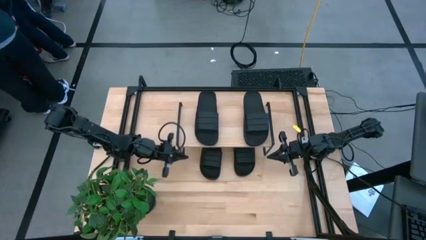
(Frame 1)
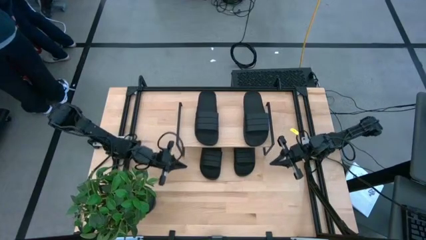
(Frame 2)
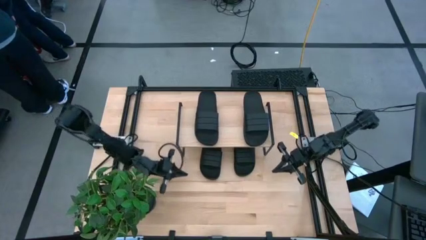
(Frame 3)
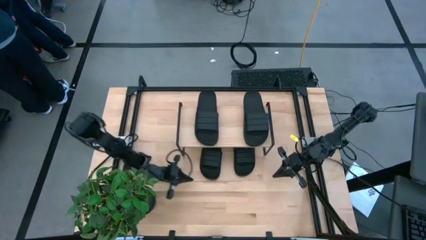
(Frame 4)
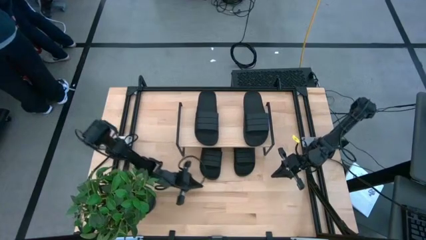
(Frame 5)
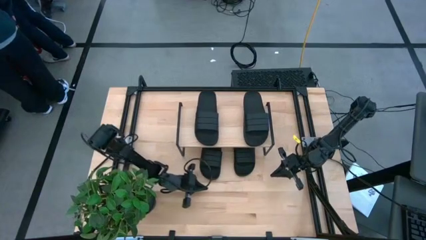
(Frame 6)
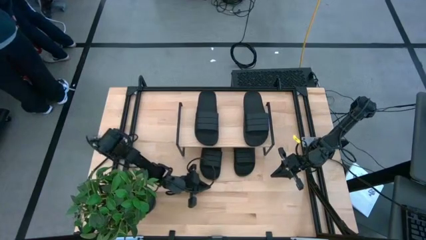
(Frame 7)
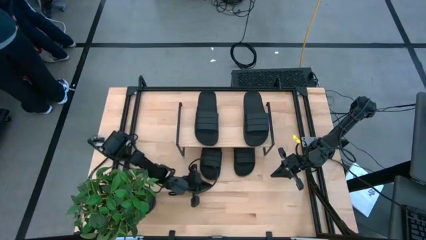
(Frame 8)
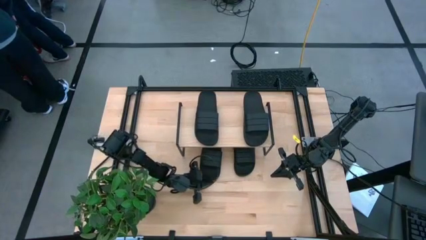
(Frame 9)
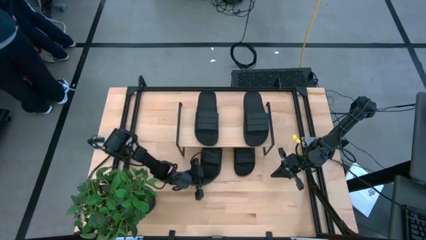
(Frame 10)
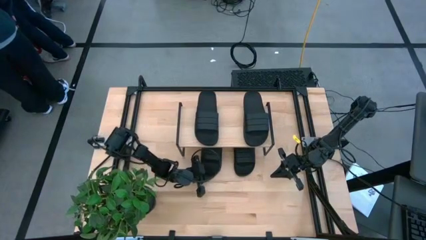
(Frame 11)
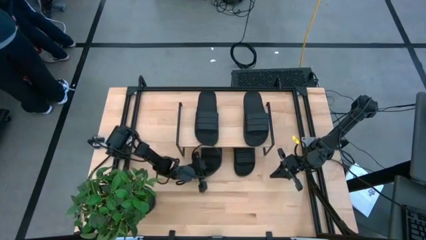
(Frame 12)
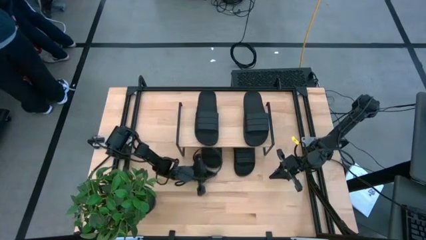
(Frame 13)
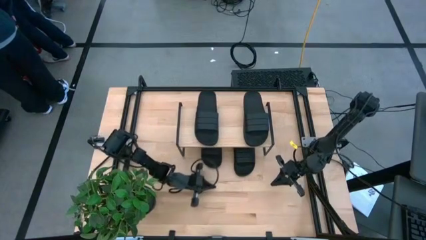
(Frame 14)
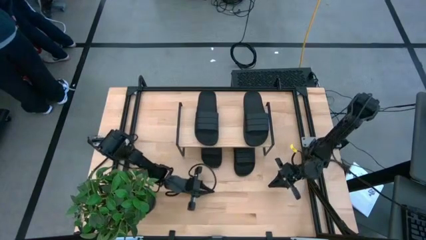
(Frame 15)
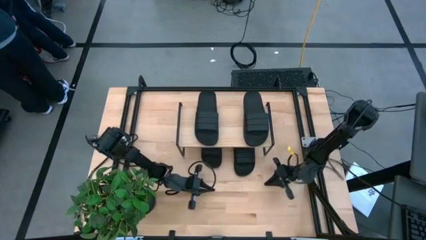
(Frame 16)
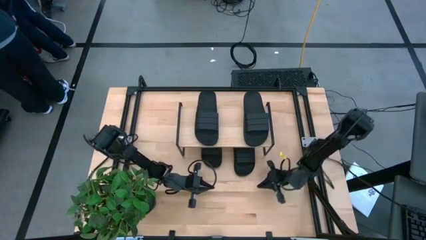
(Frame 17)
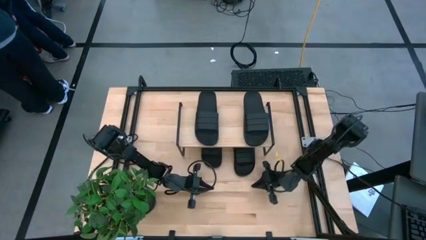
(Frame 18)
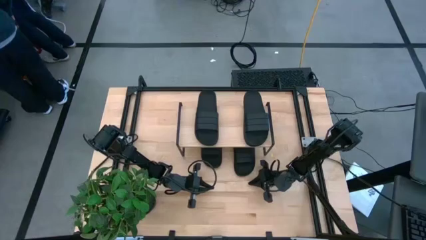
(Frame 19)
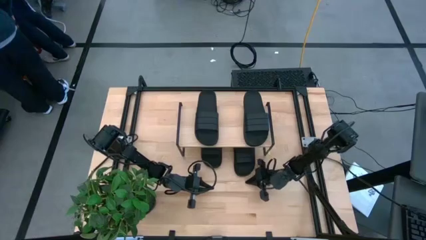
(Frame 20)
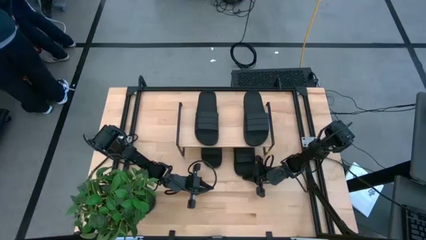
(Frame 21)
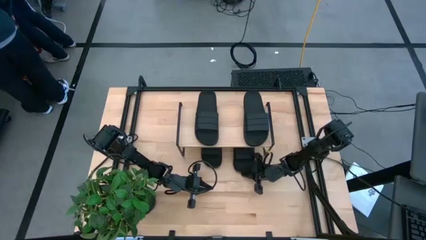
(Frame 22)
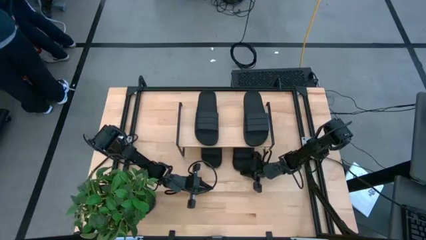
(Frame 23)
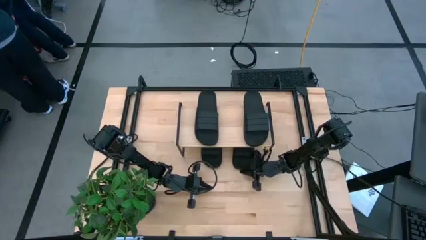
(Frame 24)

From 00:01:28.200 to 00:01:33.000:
Task: Pick and place slides into the shelf
Adjust the slides under the shelf

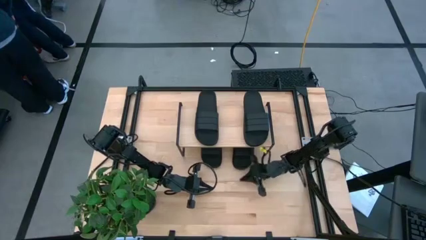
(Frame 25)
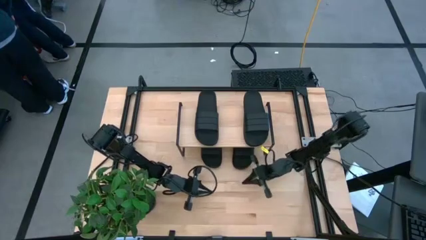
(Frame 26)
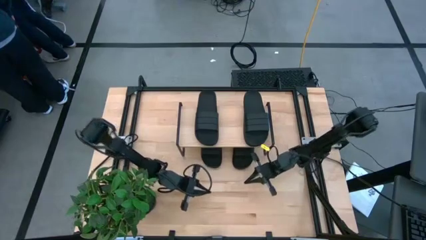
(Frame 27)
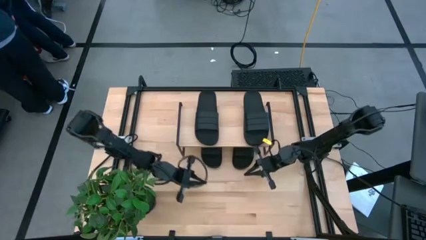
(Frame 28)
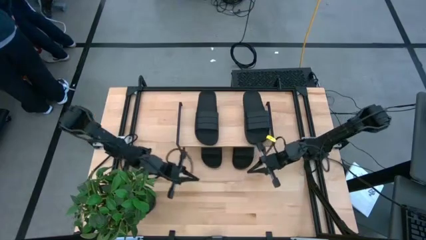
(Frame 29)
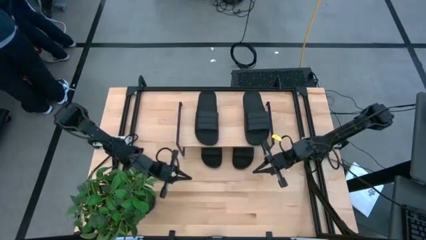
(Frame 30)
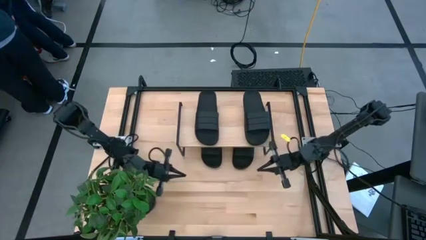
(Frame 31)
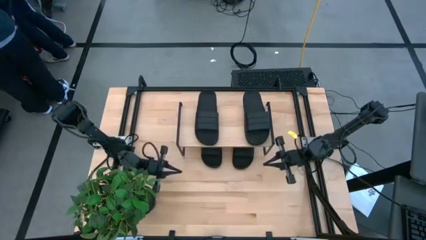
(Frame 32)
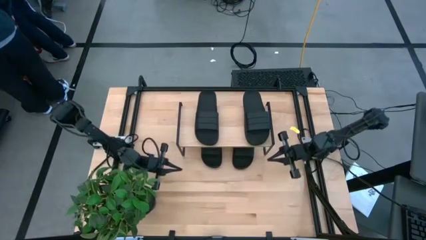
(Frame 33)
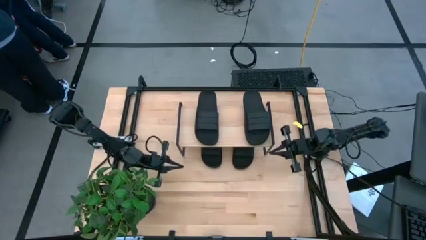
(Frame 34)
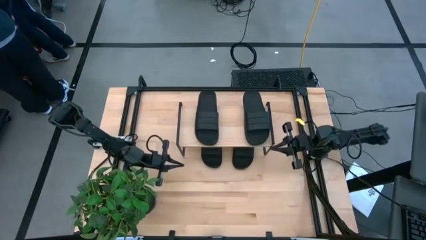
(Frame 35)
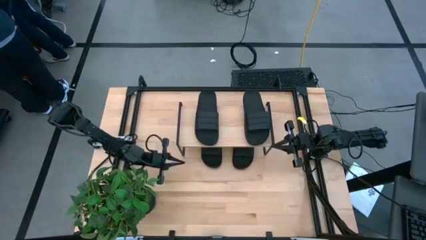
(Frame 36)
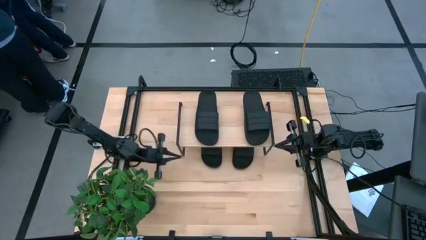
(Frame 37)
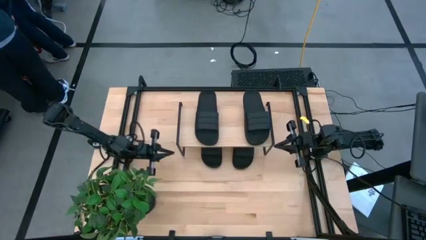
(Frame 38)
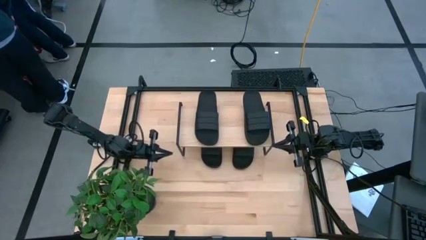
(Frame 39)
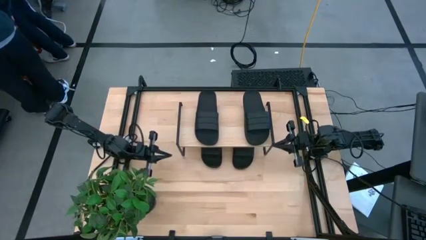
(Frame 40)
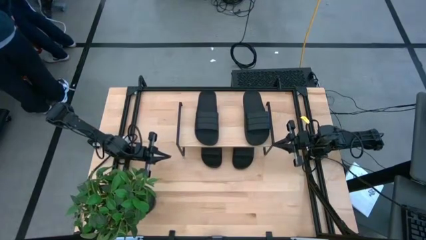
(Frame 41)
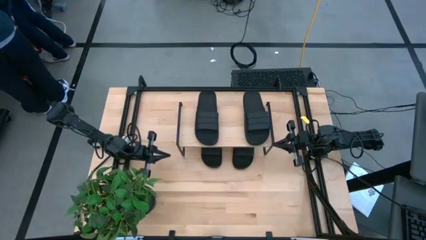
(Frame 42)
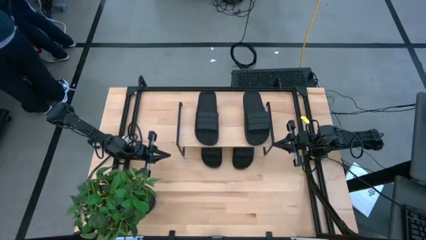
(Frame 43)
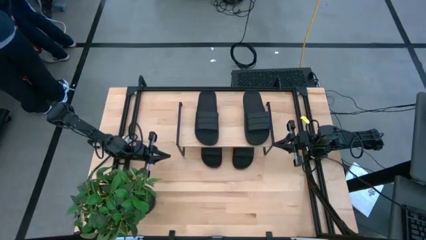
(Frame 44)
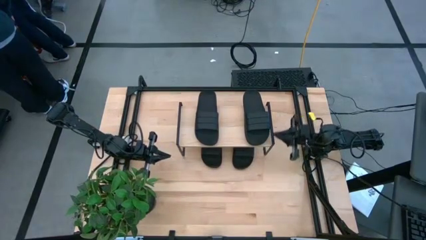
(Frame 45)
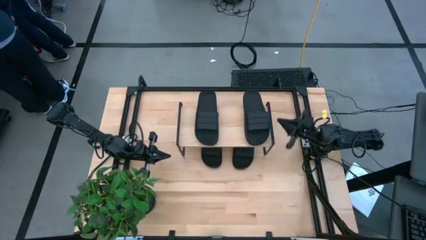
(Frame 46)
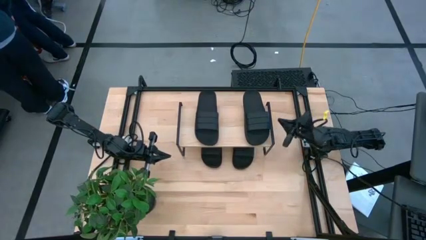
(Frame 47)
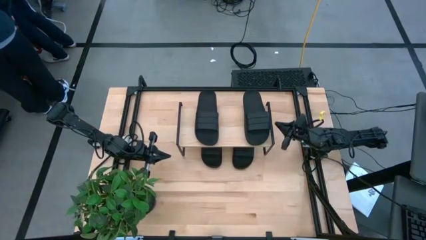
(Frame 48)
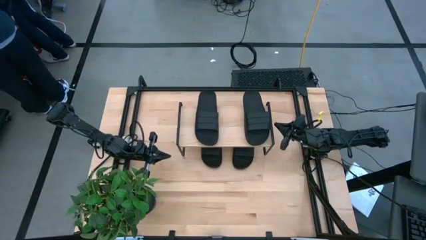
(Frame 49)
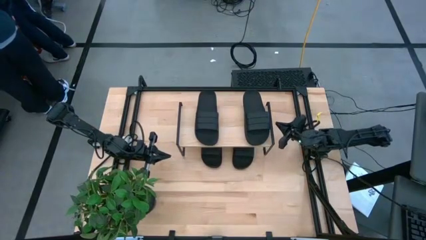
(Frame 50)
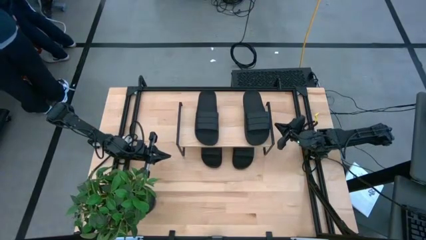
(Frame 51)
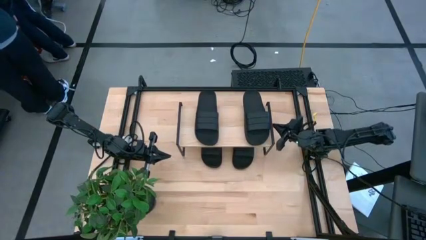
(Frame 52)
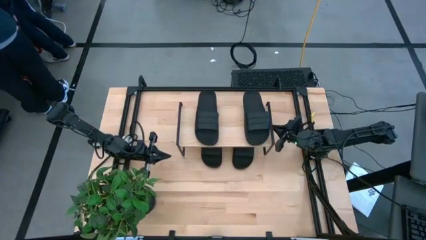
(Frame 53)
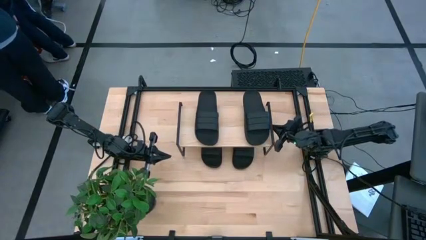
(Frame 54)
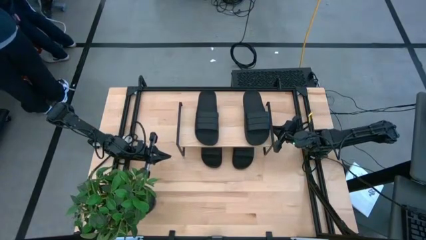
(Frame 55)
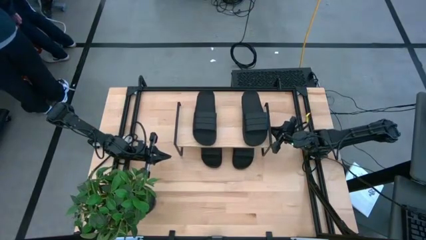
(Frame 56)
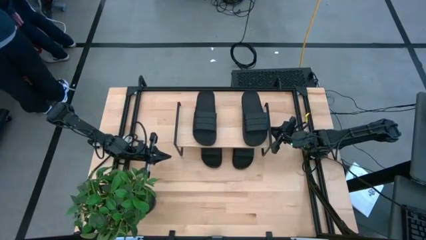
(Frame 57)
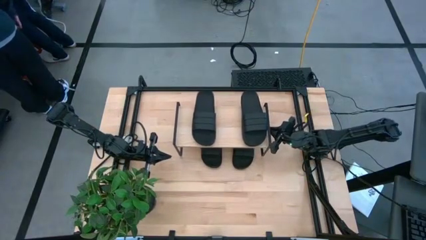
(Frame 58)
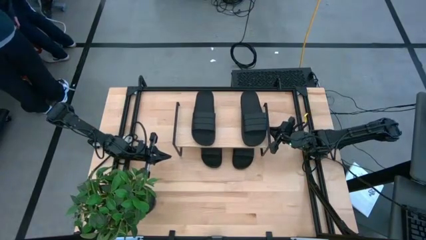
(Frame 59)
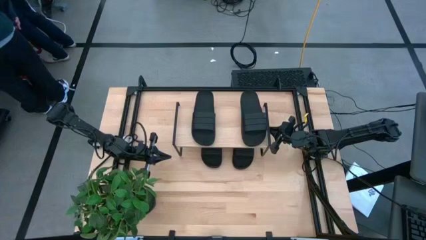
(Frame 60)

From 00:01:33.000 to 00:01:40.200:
Adjust the shelf

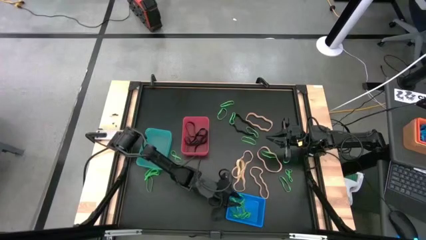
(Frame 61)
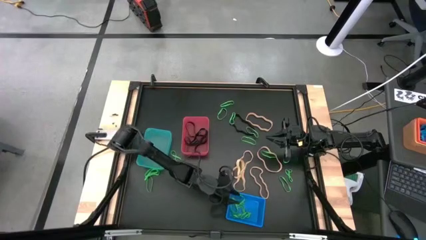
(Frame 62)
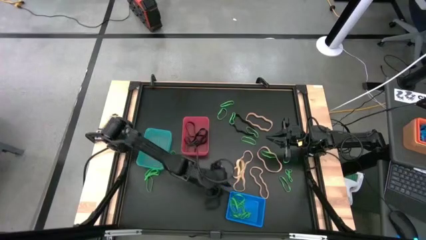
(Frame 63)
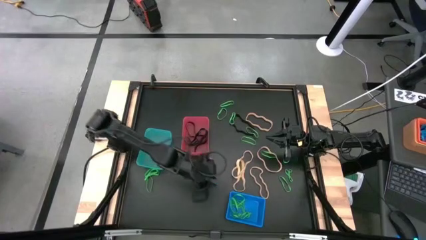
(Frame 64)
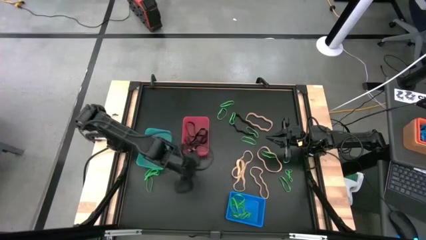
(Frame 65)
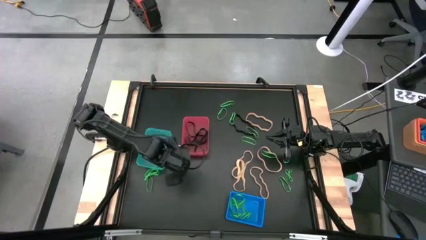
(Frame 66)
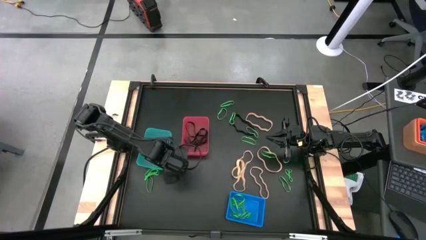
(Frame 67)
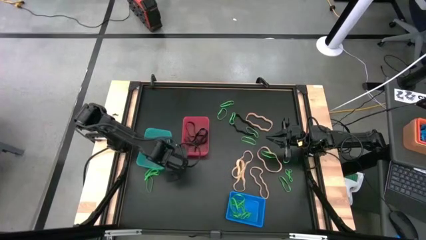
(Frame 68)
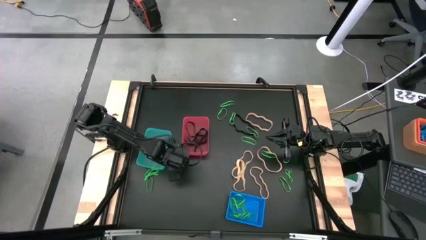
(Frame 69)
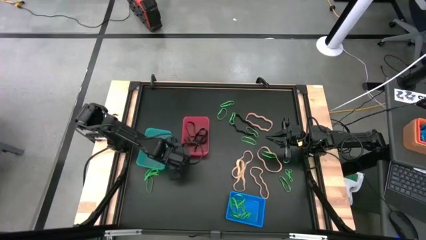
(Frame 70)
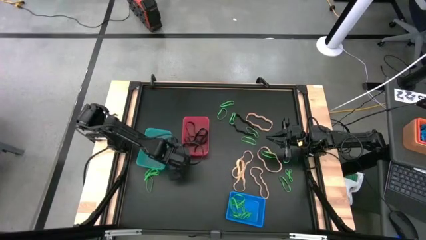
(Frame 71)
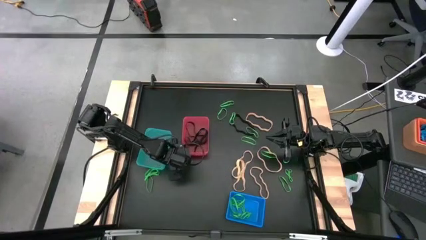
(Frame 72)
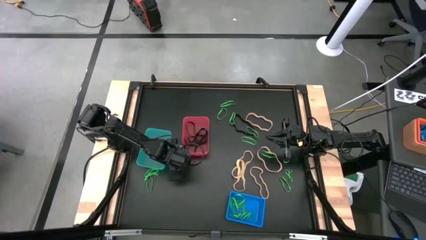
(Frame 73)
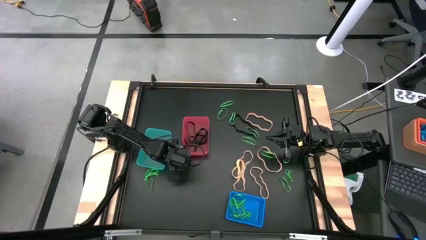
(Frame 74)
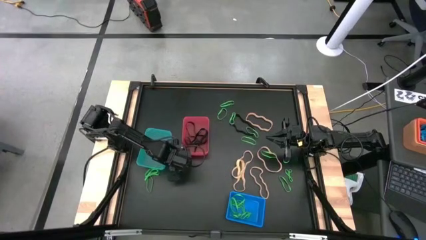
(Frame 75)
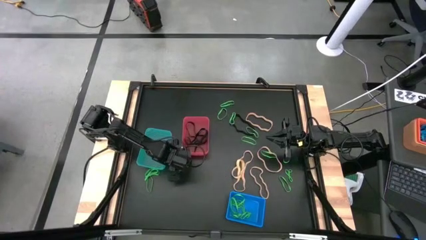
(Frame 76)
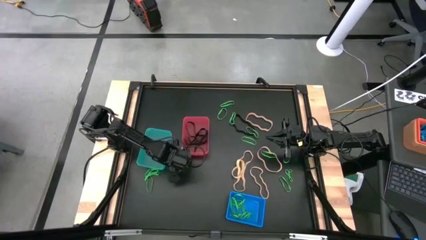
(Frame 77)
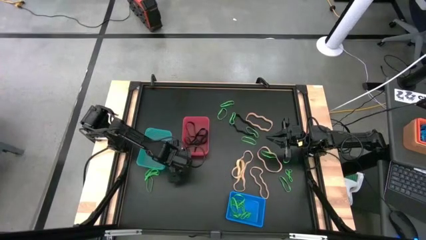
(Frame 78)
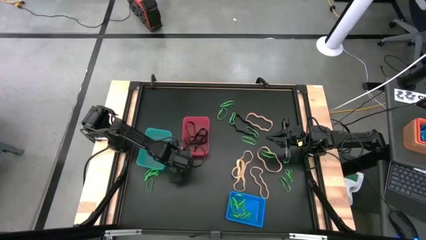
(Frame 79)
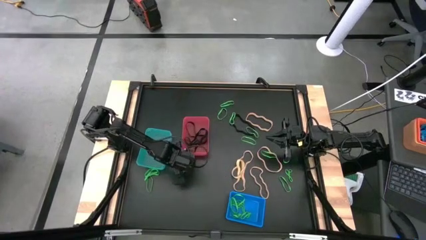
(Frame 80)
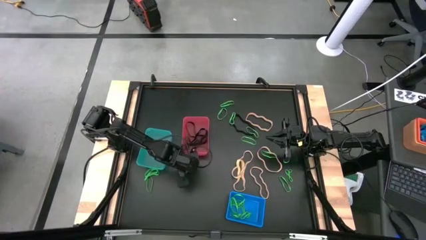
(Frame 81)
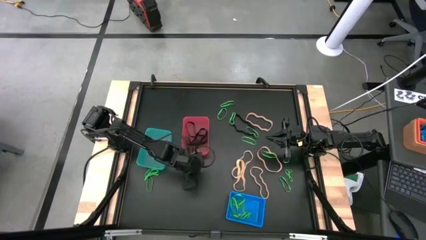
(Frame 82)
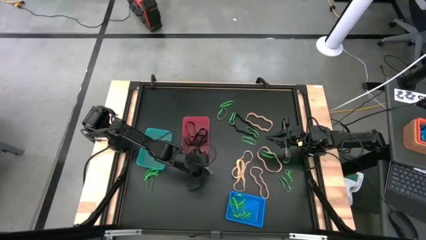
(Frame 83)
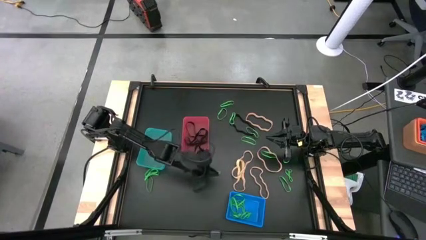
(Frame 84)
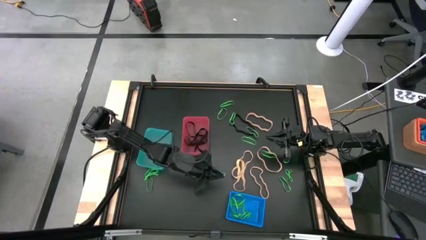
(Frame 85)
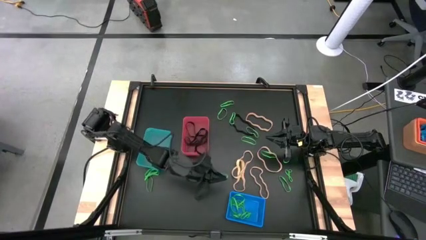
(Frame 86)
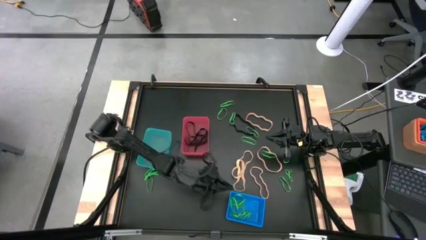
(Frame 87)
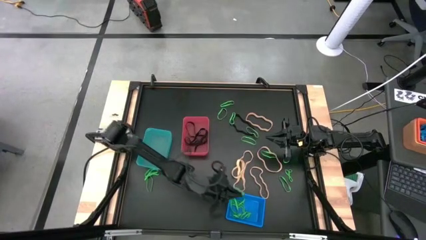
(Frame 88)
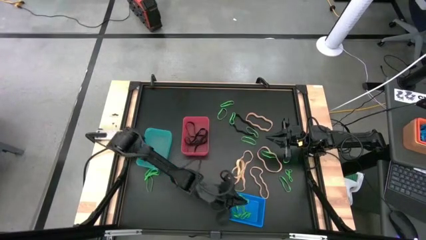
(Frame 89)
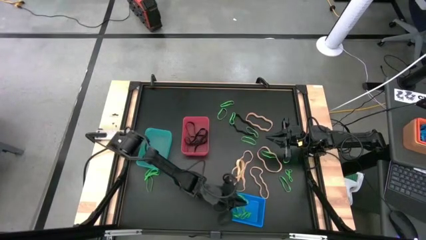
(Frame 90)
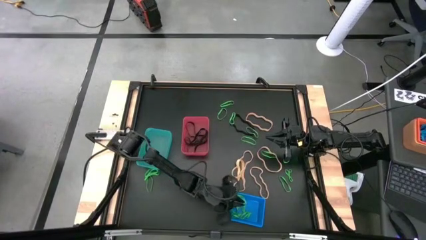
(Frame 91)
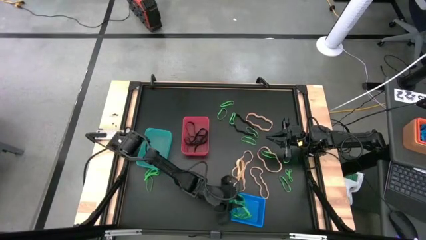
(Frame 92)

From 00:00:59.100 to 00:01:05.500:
Task: Sort rubber bands into baskets
Put the green rubber band into the blue bin
